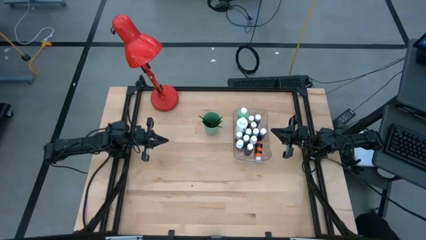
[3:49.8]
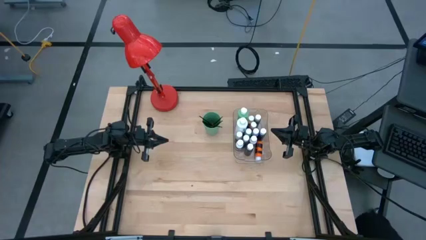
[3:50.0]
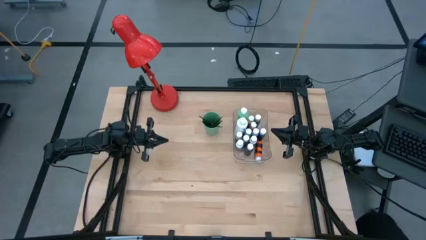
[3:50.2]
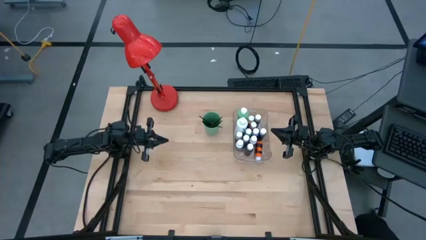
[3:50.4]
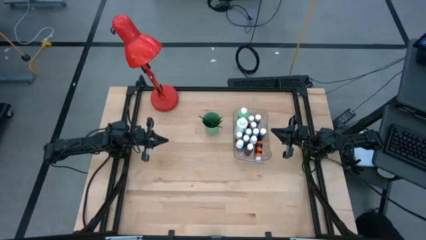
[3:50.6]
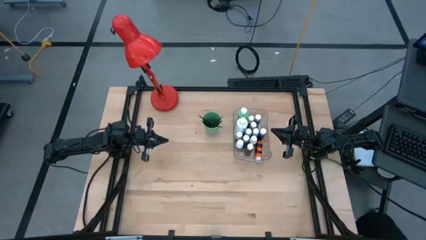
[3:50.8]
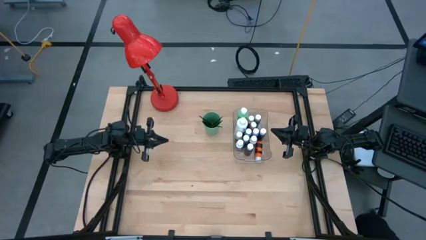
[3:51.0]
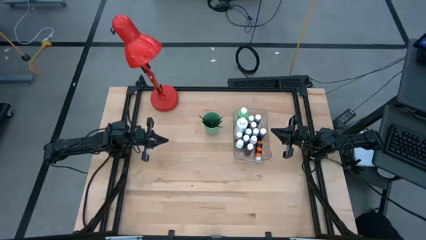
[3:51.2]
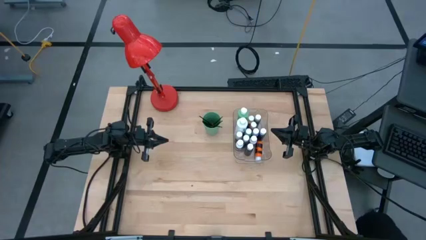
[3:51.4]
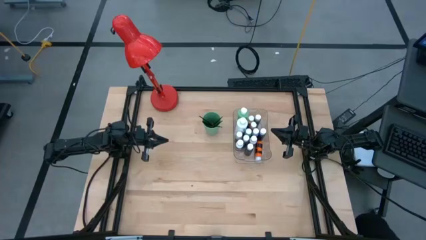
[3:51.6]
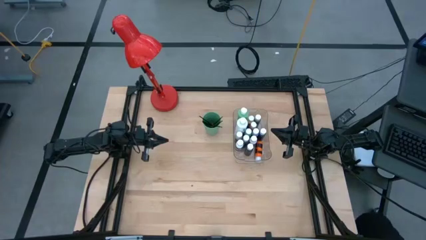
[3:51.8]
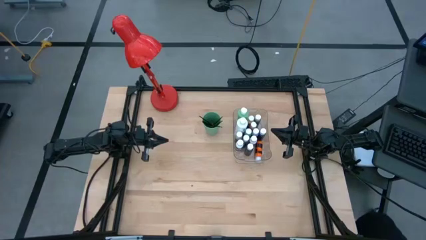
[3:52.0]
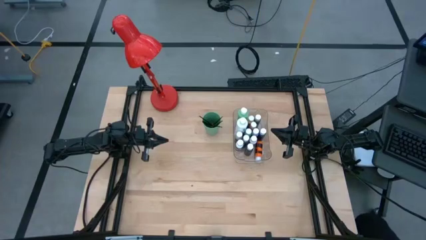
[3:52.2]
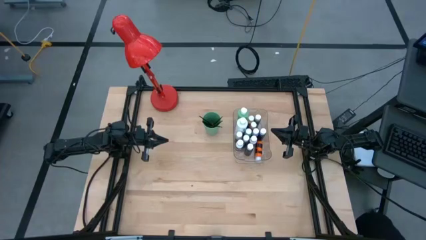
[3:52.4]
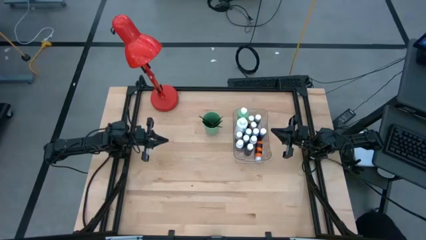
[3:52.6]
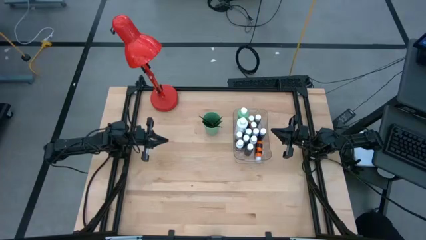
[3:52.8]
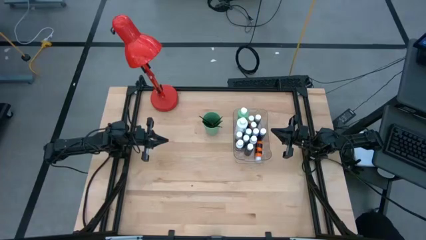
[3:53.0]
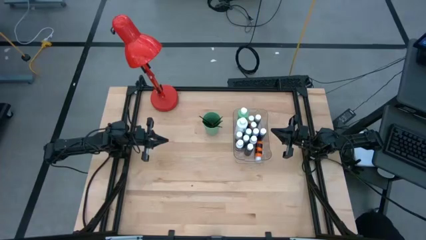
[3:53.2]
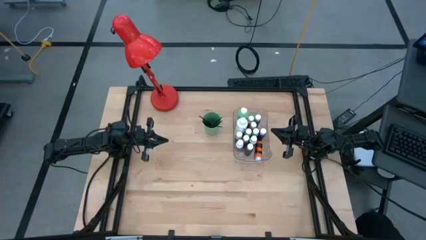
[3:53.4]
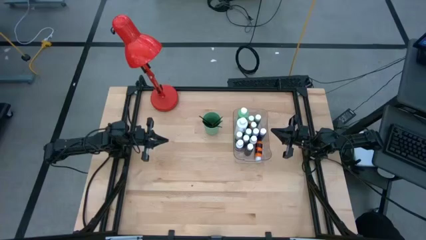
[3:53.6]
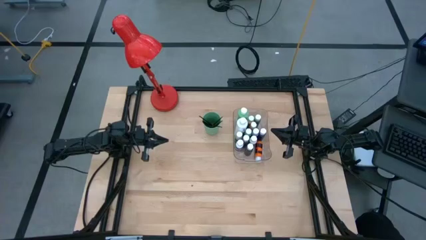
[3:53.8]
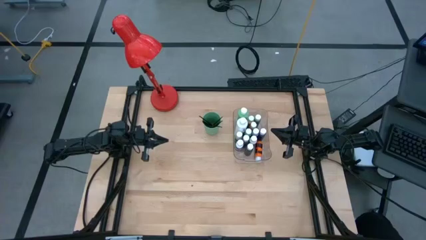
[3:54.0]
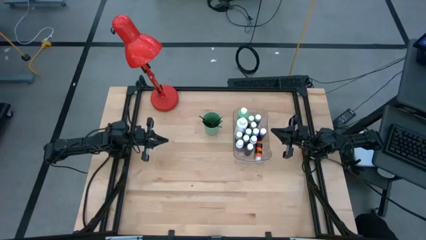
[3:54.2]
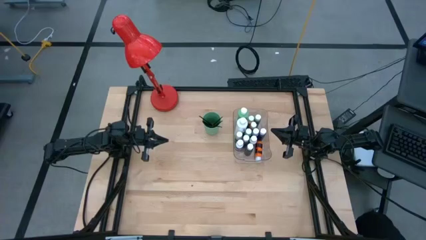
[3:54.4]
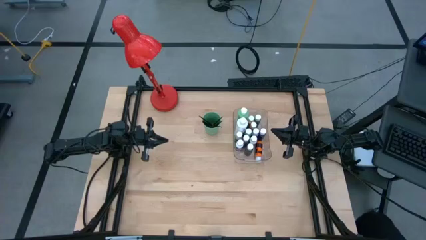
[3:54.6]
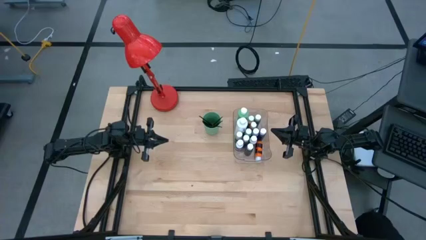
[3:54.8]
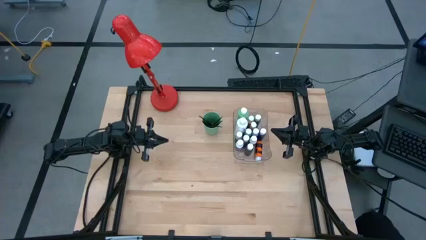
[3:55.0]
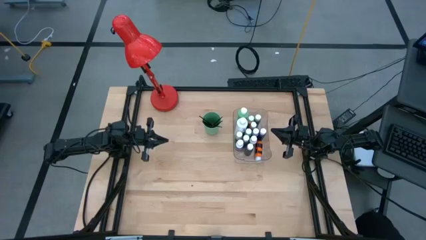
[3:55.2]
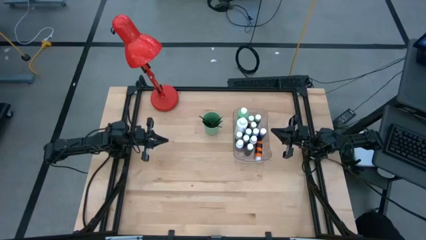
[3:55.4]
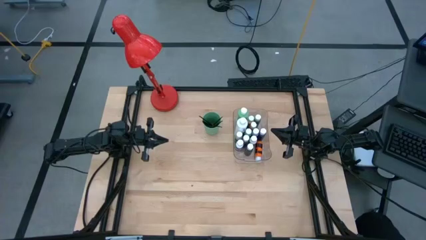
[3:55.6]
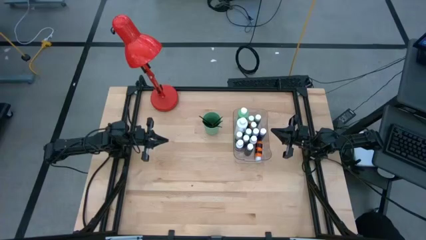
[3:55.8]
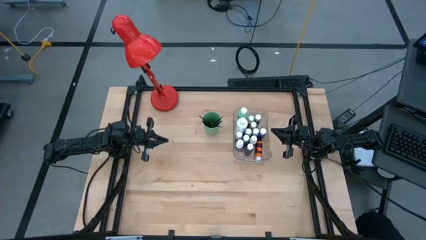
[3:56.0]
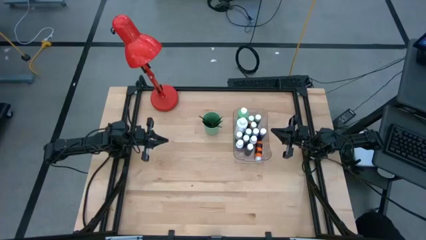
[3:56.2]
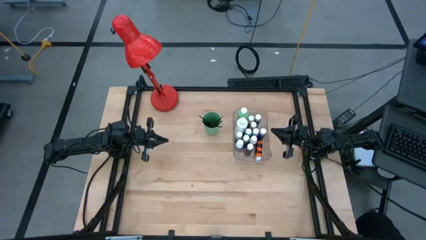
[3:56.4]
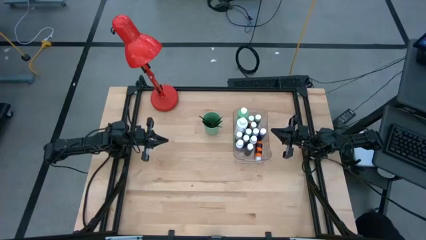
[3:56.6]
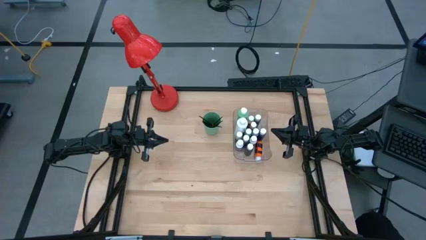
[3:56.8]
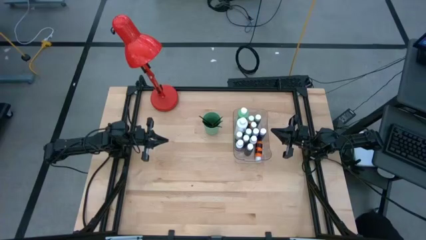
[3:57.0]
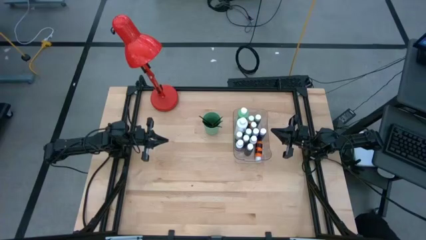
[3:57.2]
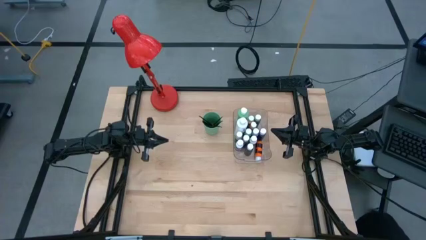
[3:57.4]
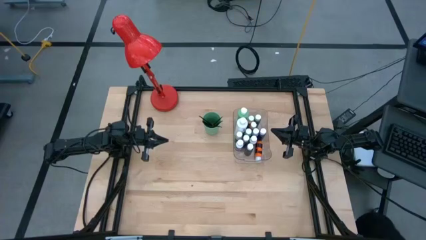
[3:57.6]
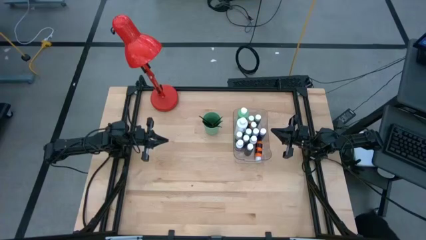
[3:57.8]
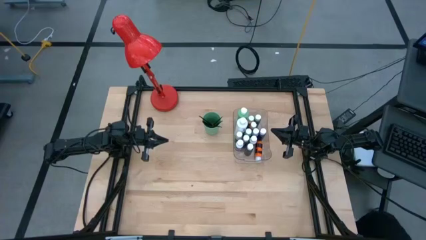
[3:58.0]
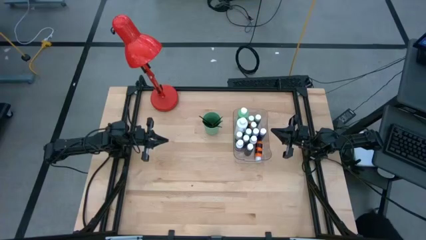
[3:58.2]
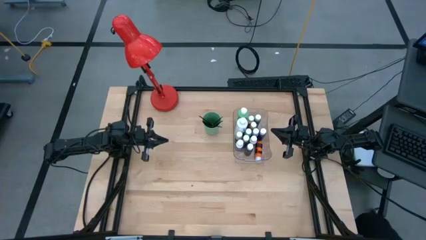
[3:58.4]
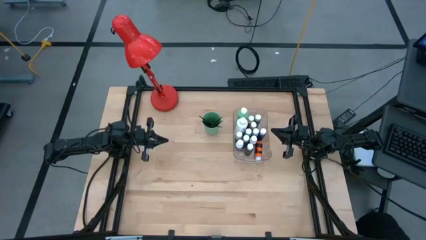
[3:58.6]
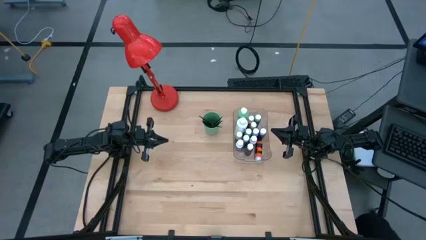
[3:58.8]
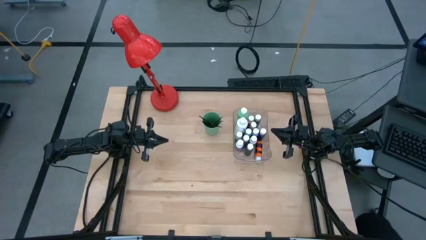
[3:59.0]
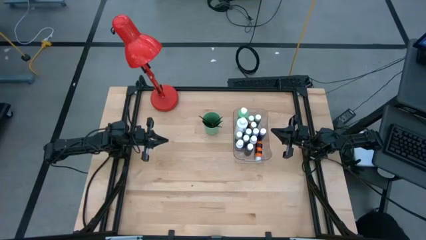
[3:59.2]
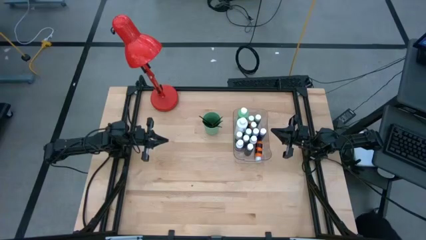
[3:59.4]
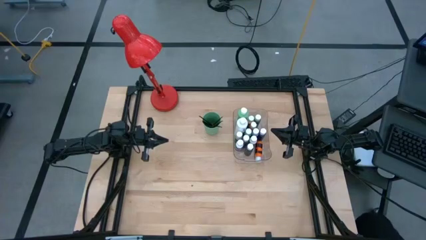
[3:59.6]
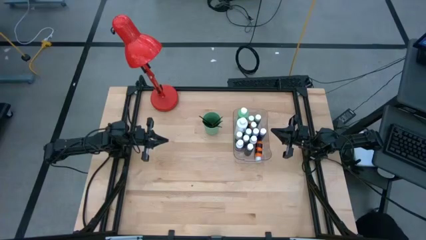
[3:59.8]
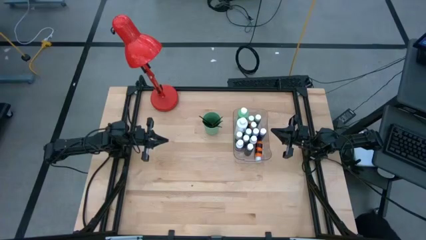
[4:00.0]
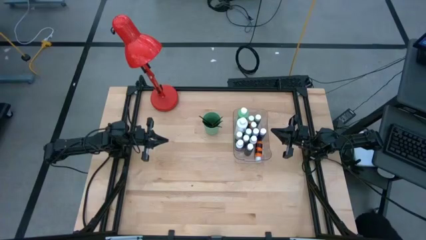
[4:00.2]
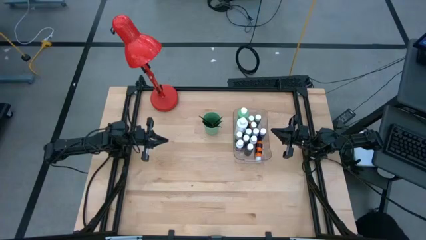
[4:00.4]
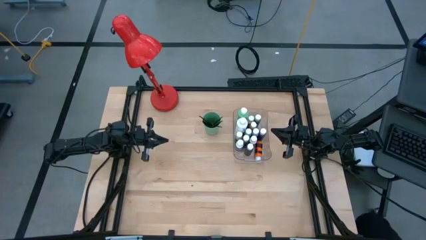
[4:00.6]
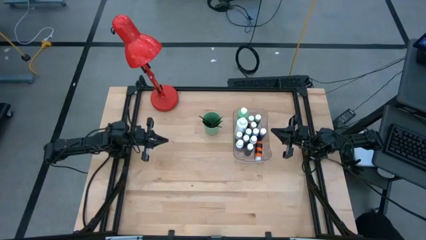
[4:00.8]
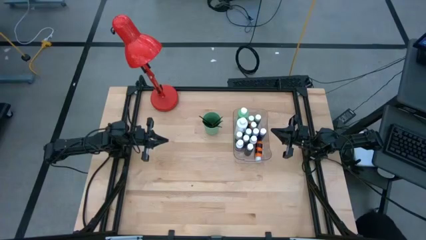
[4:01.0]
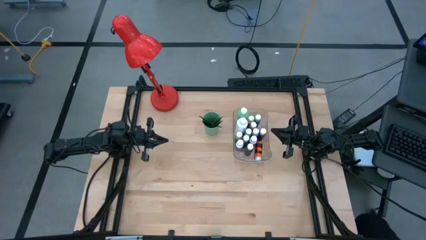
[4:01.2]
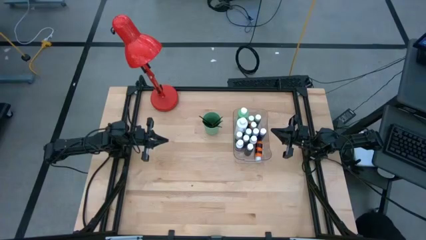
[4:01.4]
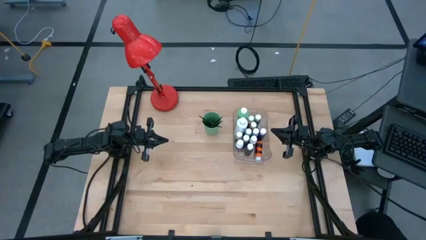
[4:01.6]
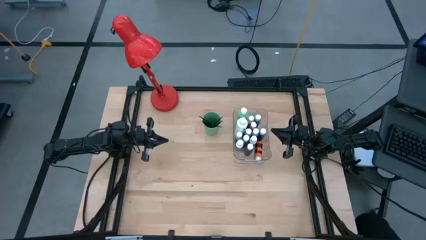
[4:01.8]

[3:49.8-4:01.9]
Task: Pick & Place Paint Supplies
Return to Home Position
